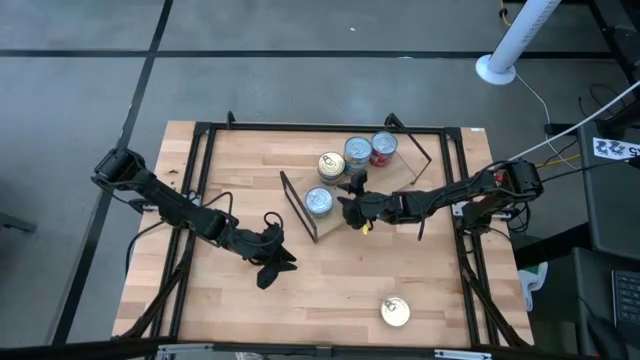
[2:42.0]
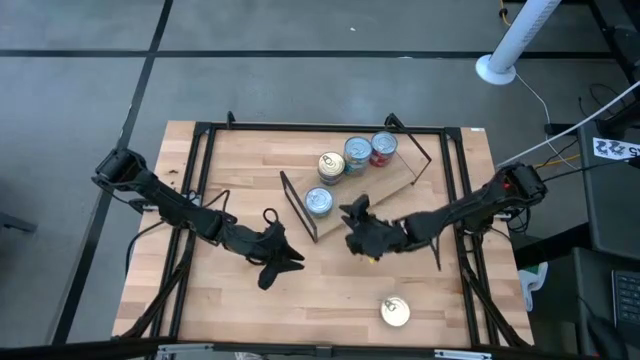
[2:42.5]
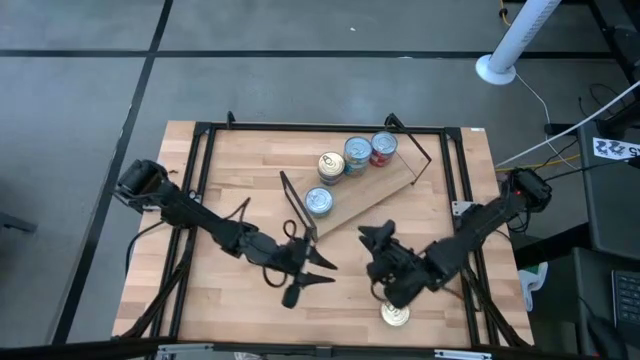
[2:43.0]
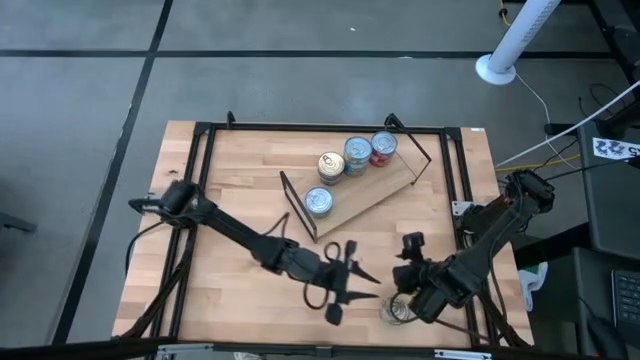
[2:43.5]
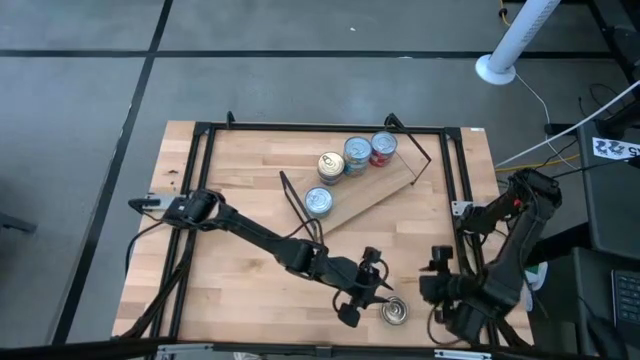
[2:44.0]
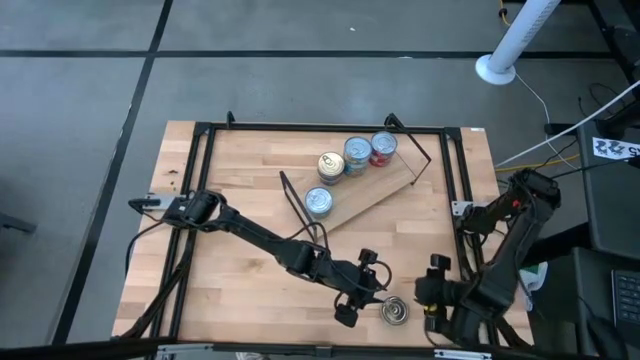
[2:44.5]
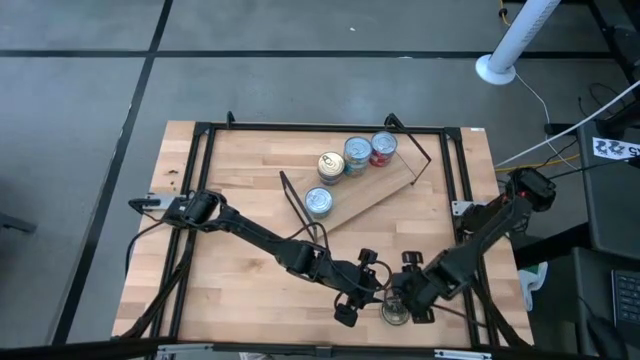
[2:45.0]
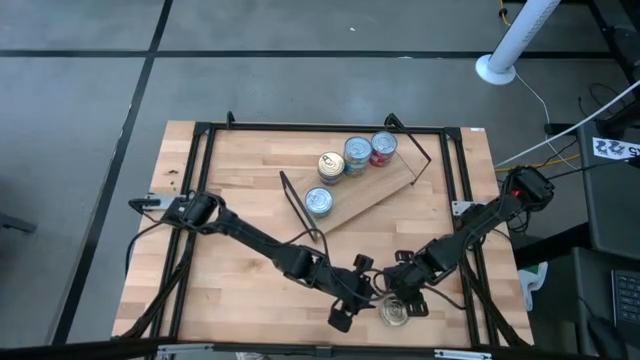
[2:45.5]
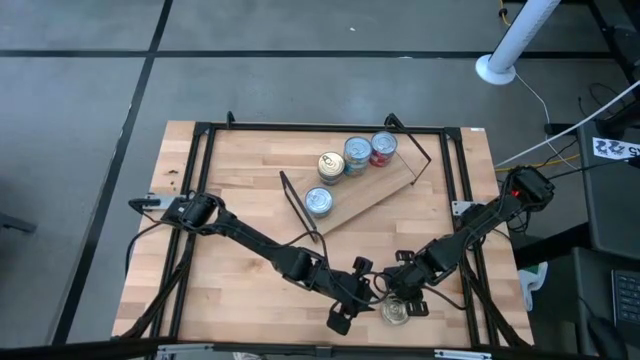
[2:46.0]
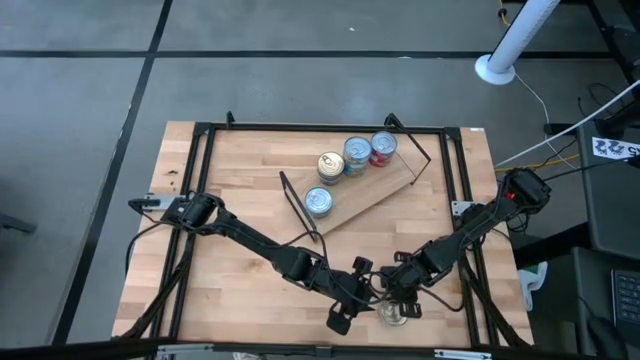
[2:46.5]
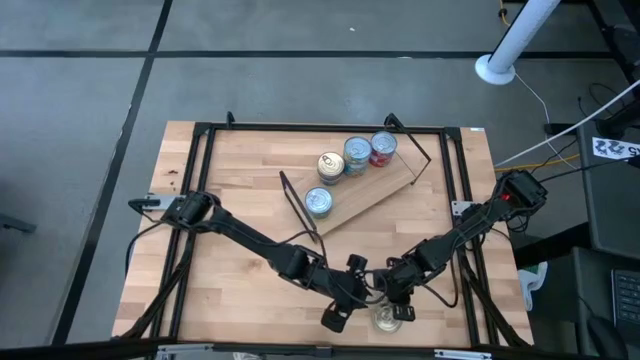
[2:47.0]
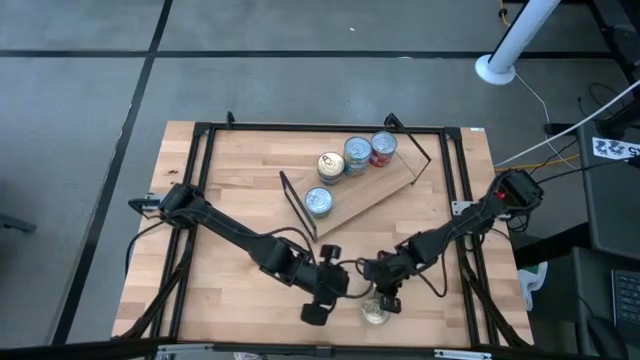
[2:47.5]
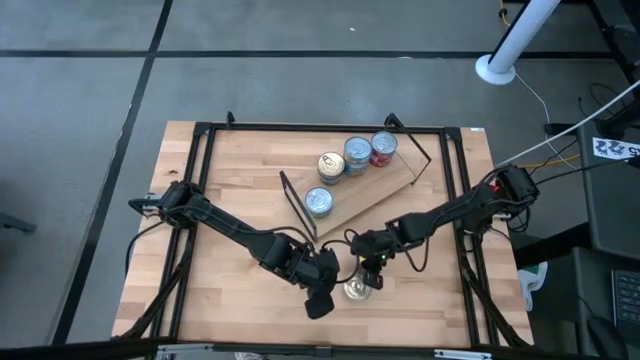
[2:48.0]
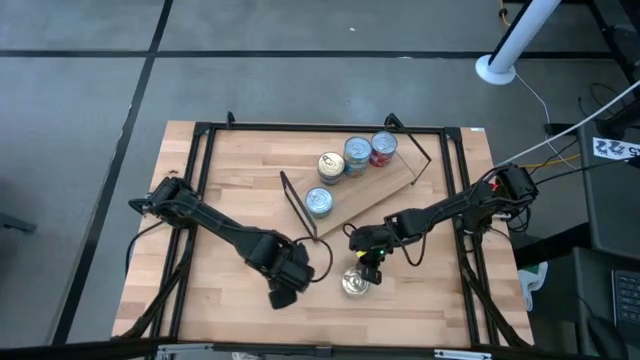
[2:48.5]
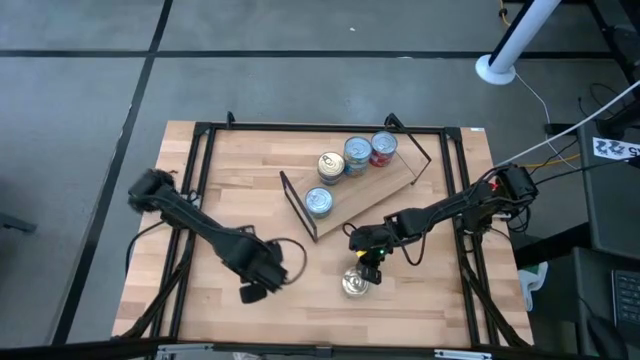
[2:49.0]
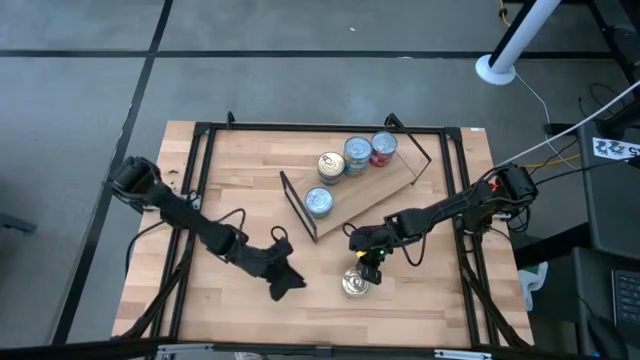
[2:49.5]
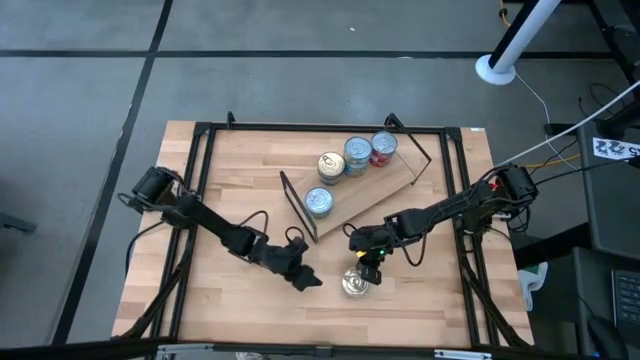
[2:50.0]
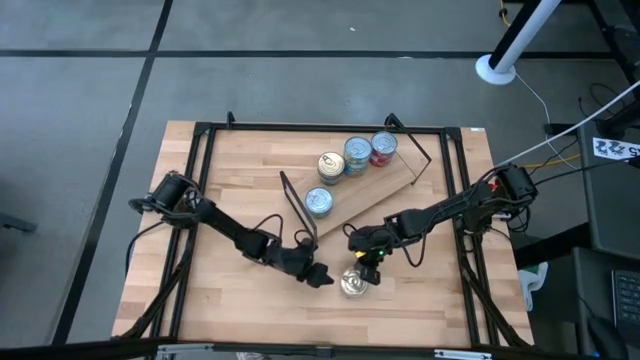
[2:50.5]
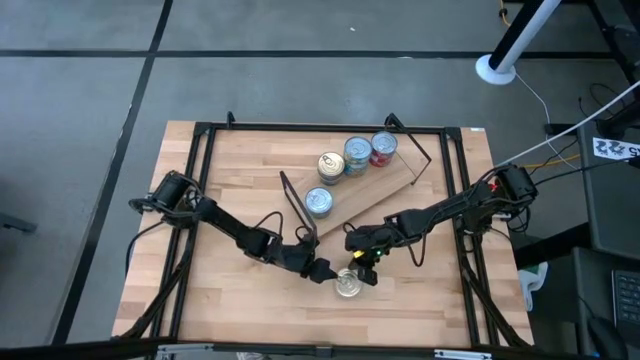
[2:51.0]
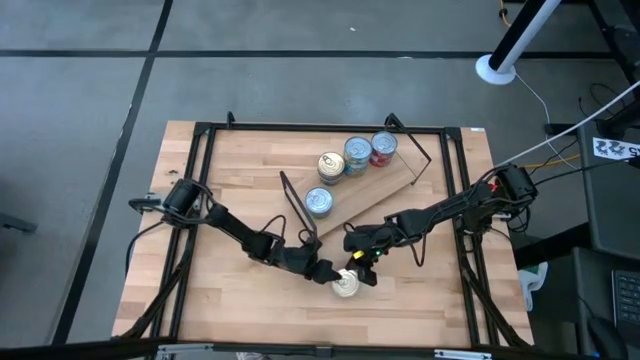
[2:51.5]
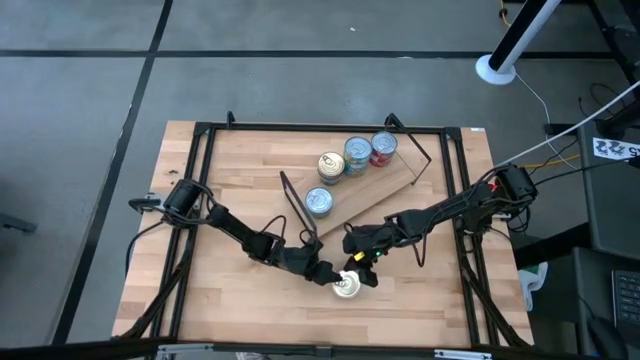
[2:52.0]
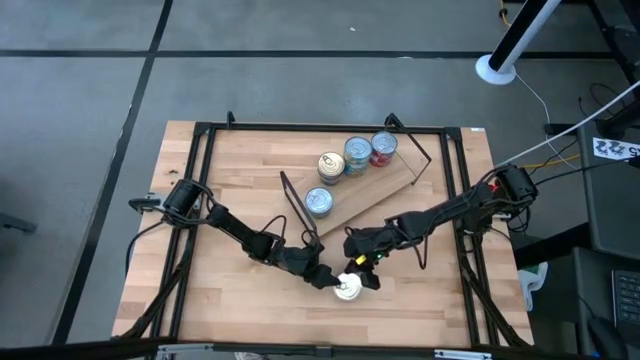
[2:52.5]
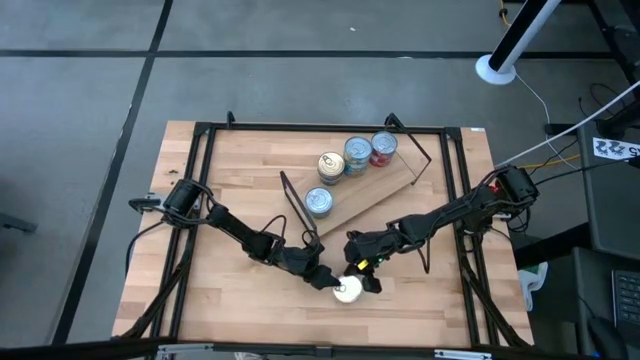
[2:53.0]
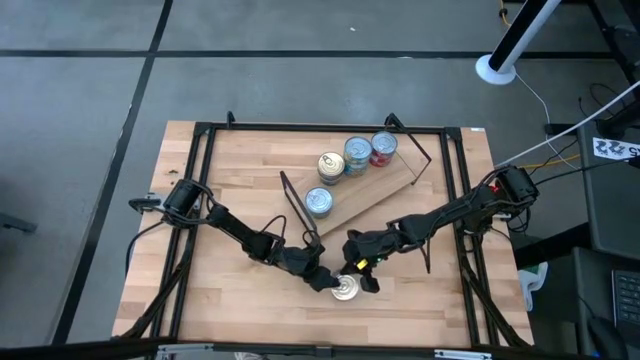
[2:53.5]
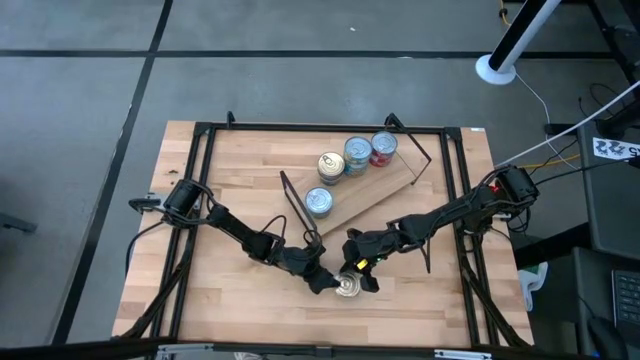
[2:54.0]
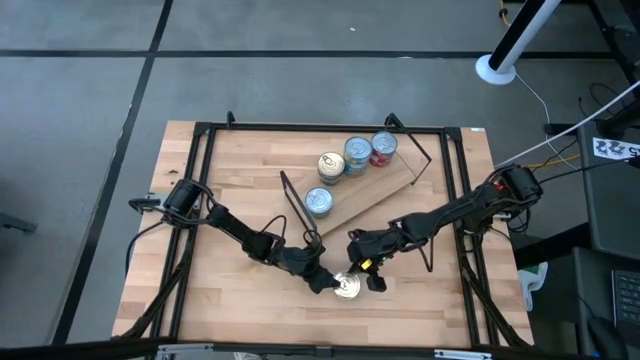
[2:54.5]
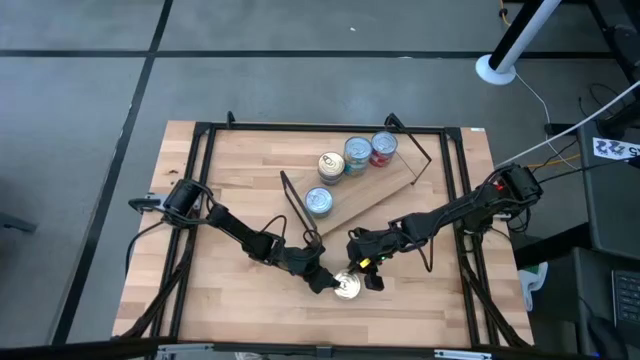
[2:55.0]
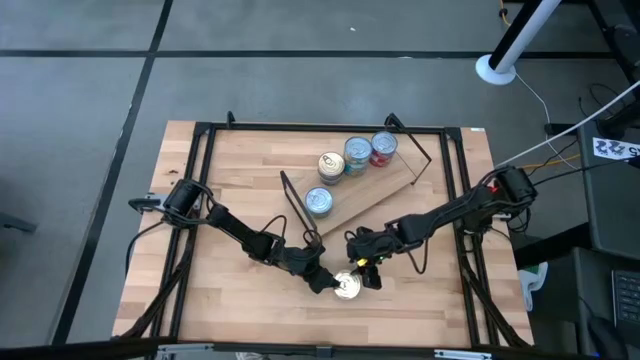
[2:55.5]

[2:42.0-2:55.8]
Task: Stack canned seafood by type on shelf
Stack the blue tuna can on top of the blue tuna can on the shelf

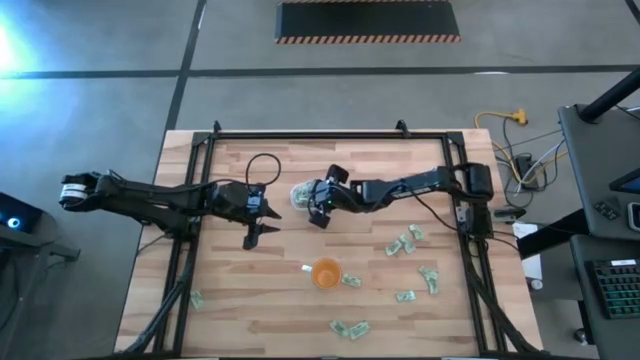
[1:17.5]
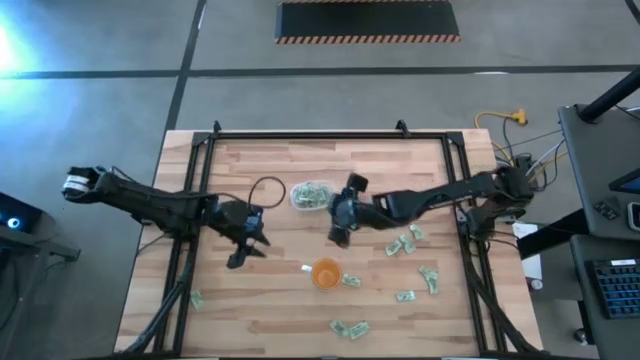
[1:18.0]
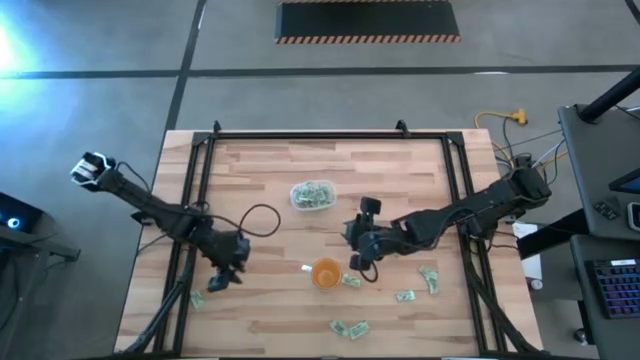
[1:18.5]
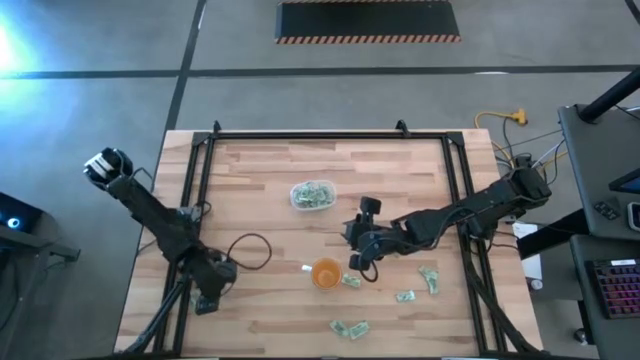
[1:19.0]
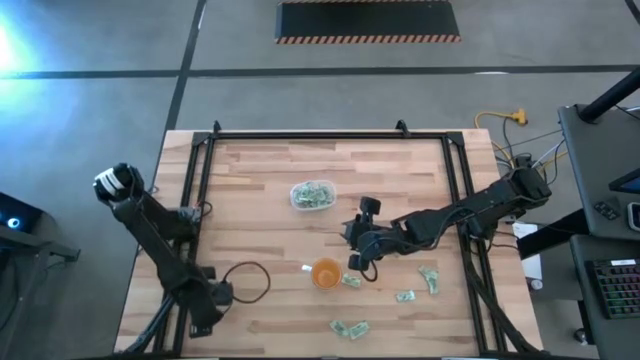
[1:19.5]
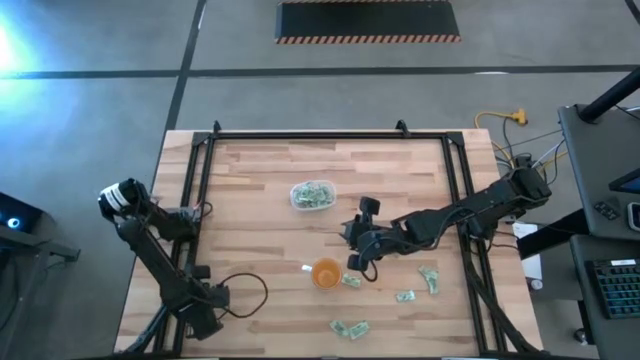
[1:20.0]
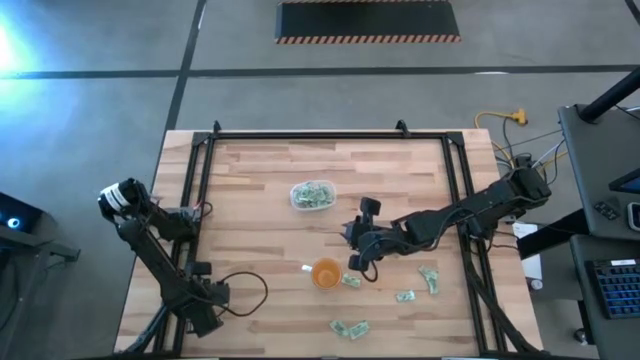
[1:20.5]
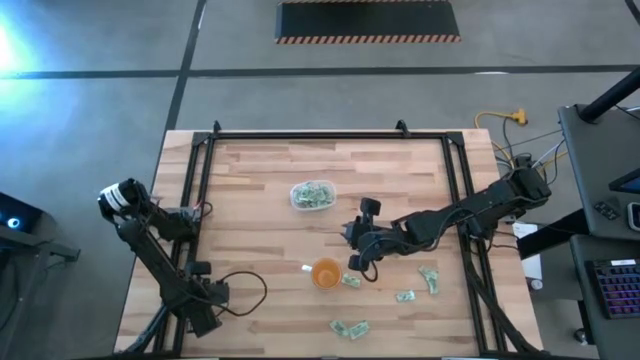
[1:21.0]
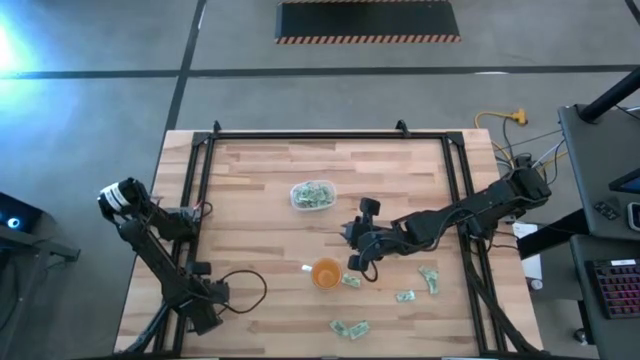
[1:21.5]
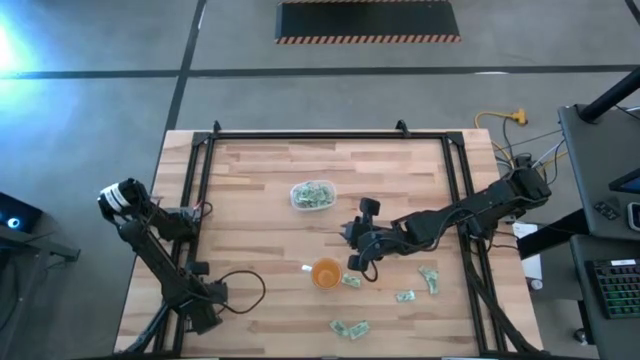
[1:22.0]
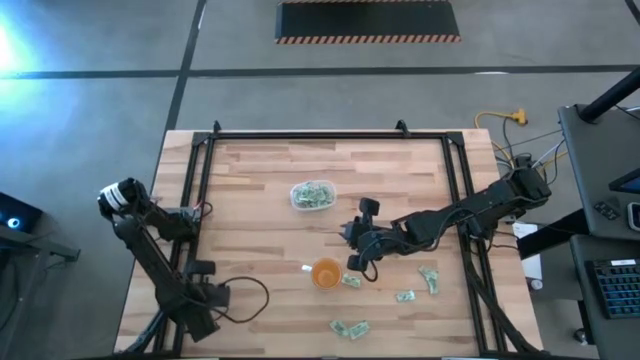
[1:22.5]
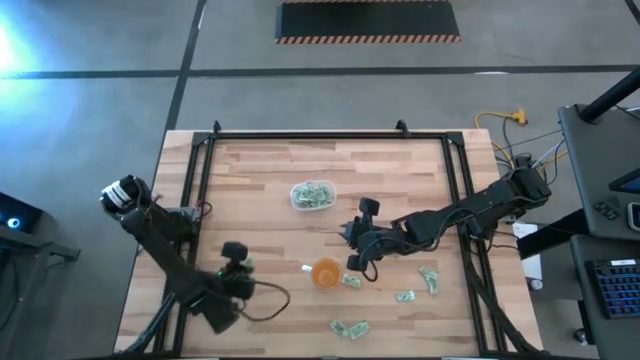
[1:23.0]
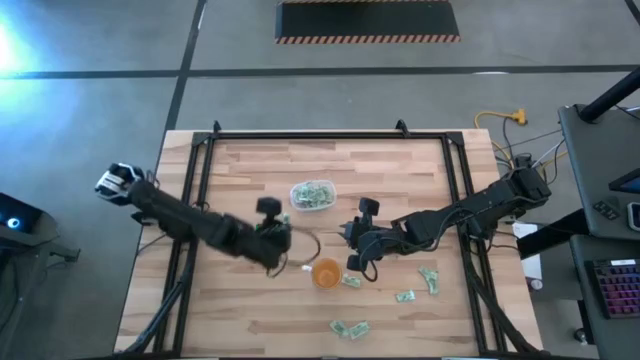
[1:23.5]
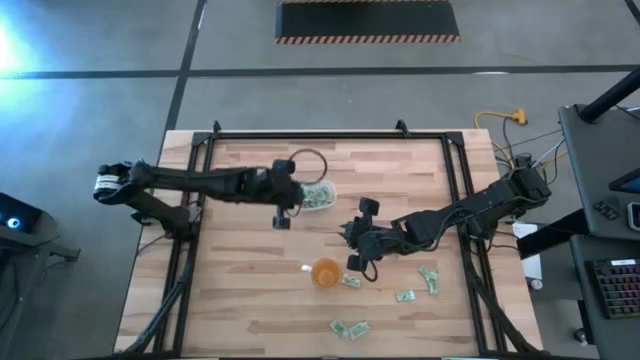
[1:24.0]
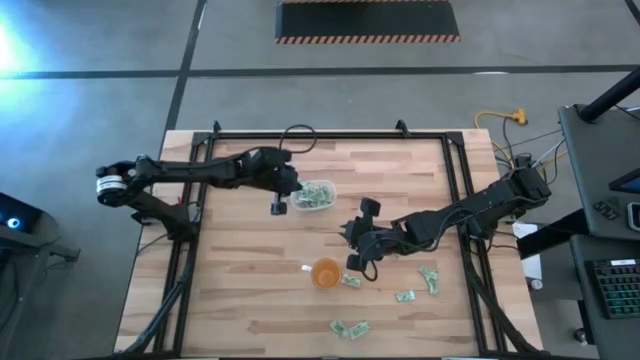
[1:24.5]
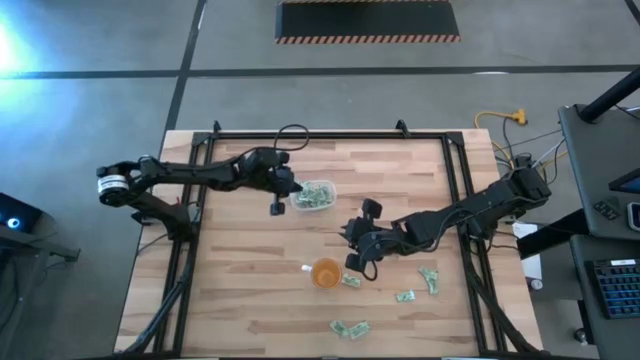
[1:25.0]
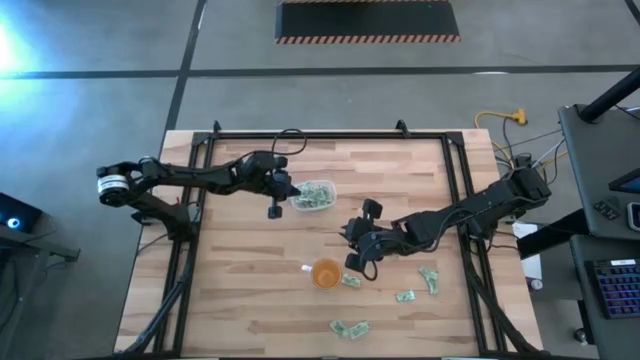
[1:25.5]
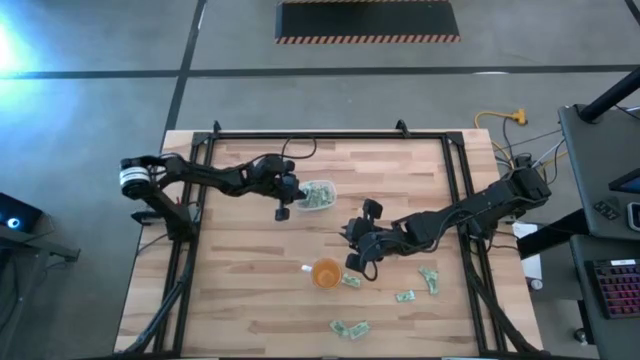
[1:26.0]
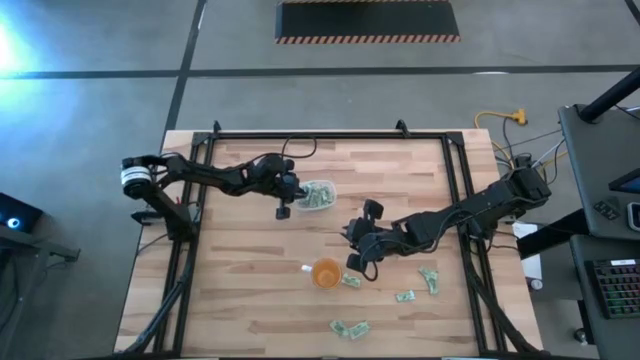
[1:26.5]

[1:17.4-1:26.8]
Task: Pick and place Stevia / Truvia into bins
Put the stevia packet into the transparent bin
